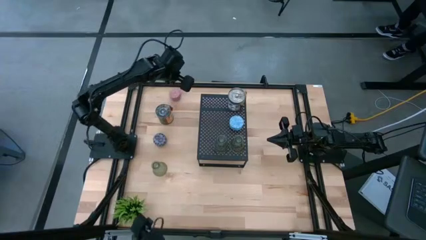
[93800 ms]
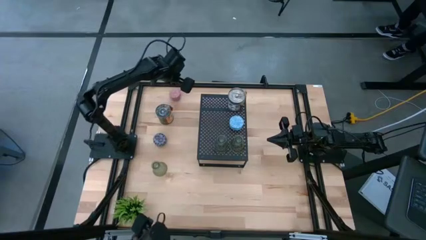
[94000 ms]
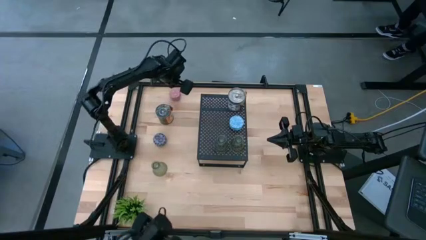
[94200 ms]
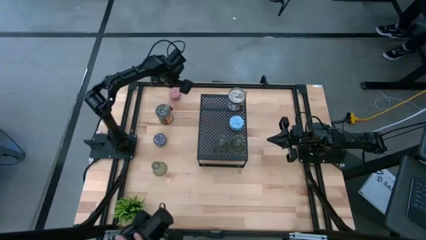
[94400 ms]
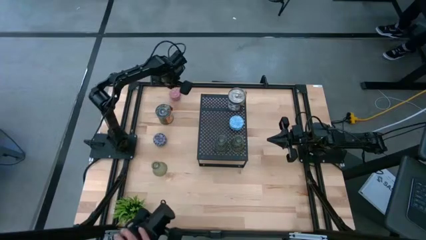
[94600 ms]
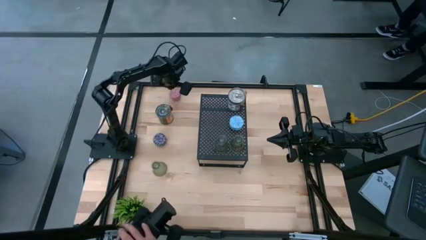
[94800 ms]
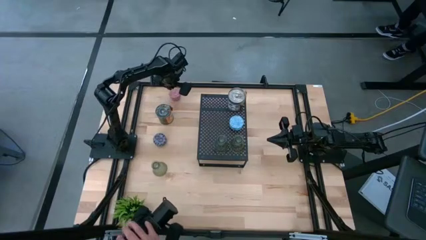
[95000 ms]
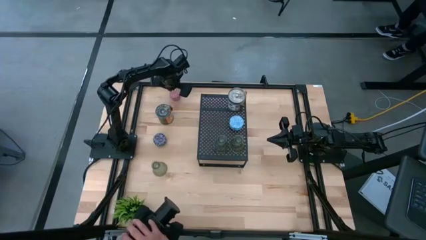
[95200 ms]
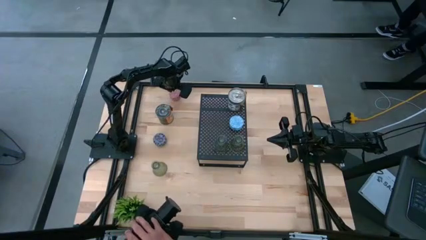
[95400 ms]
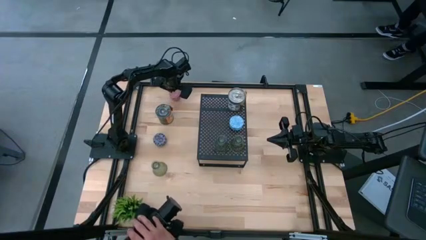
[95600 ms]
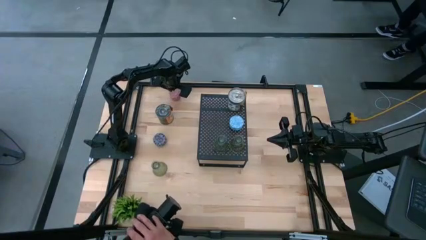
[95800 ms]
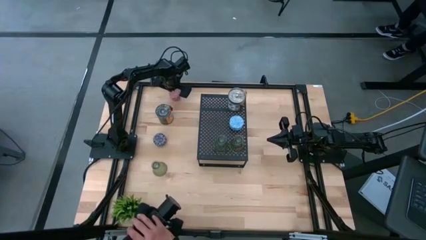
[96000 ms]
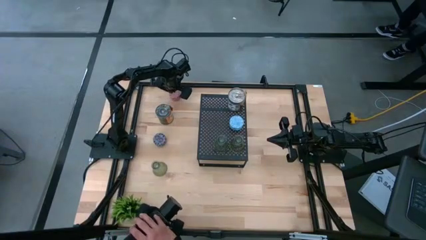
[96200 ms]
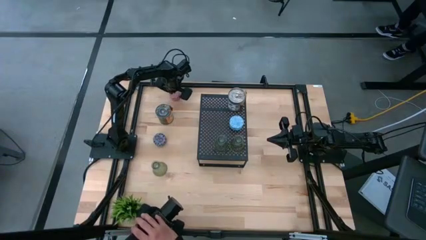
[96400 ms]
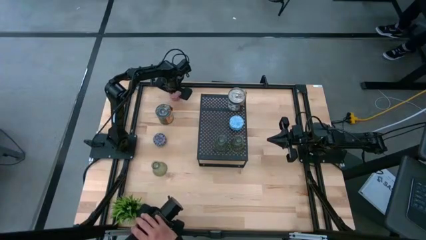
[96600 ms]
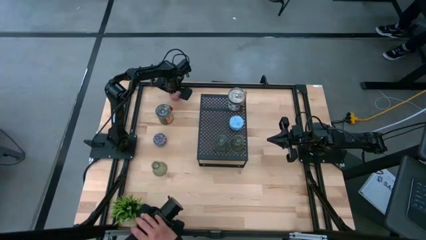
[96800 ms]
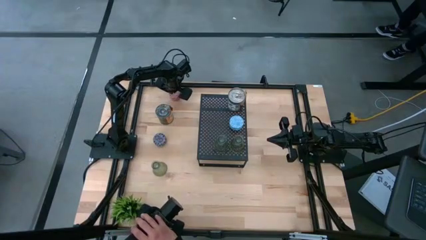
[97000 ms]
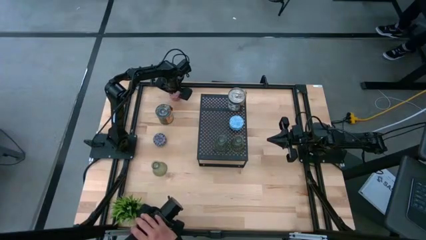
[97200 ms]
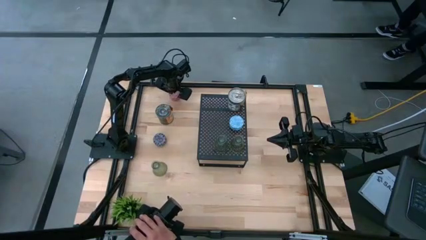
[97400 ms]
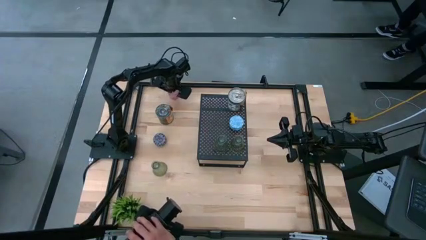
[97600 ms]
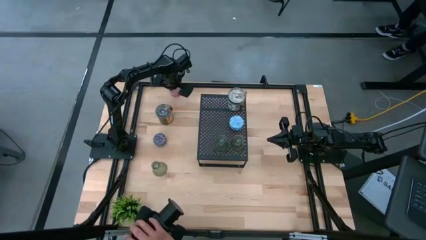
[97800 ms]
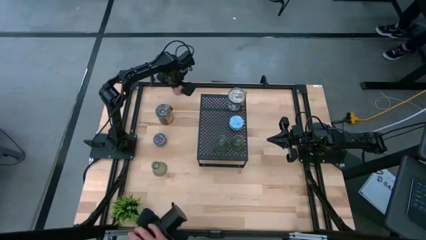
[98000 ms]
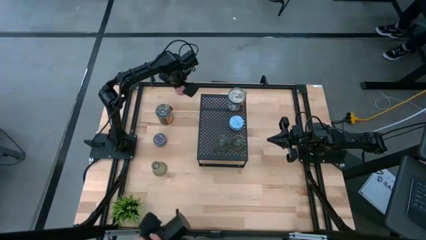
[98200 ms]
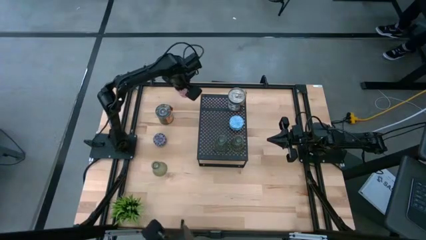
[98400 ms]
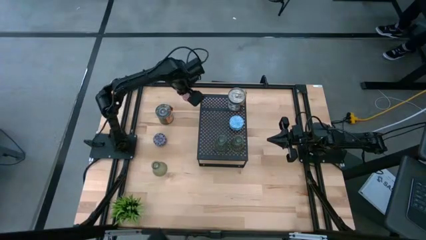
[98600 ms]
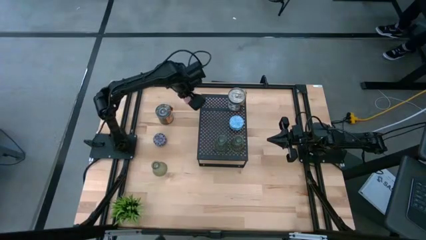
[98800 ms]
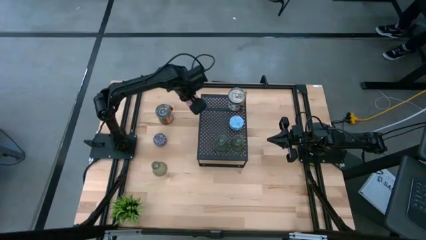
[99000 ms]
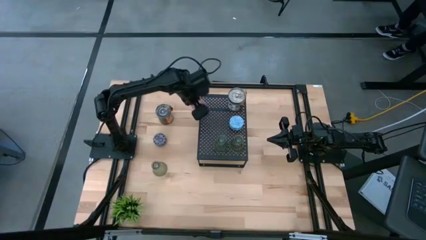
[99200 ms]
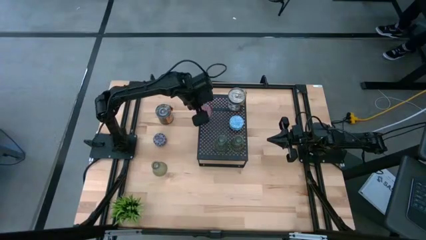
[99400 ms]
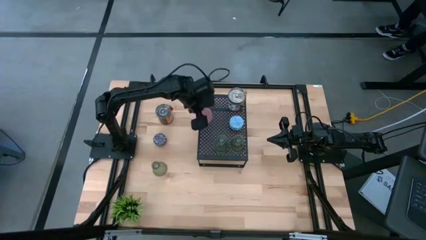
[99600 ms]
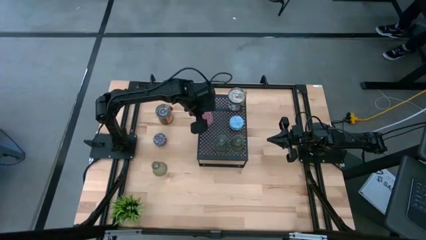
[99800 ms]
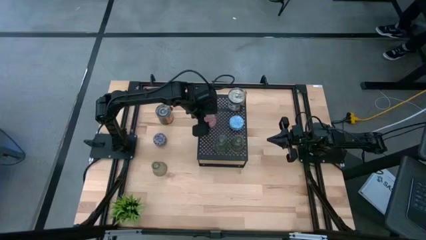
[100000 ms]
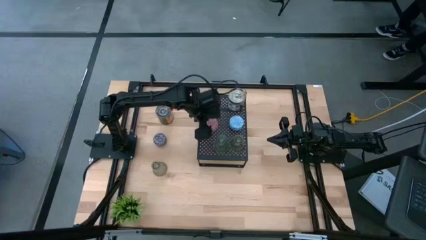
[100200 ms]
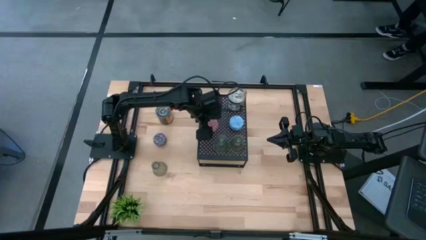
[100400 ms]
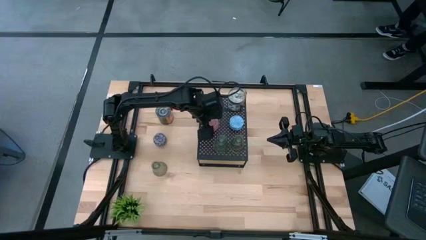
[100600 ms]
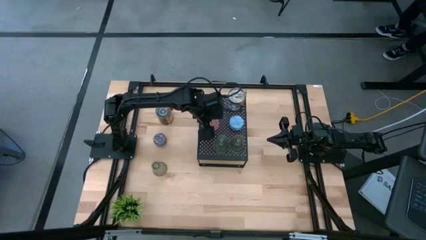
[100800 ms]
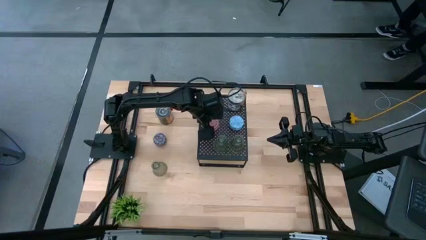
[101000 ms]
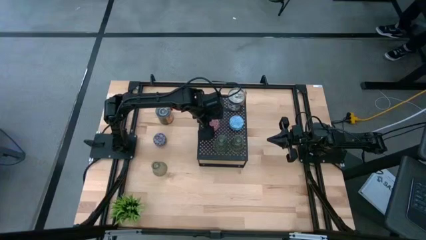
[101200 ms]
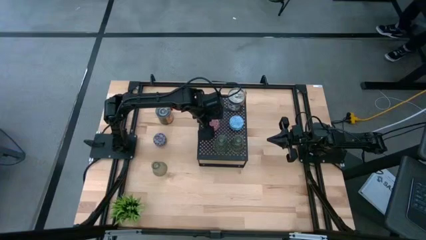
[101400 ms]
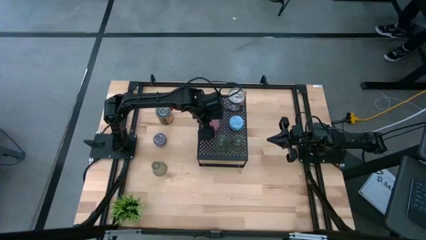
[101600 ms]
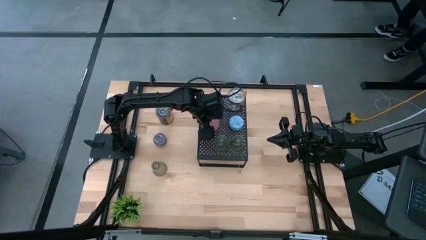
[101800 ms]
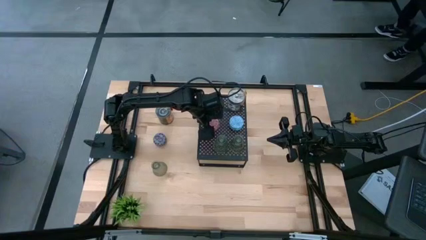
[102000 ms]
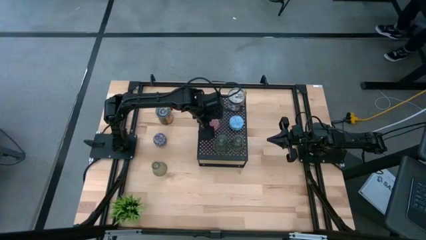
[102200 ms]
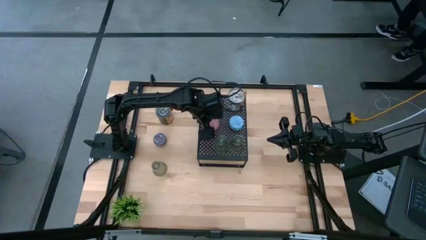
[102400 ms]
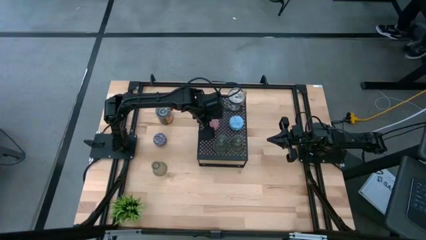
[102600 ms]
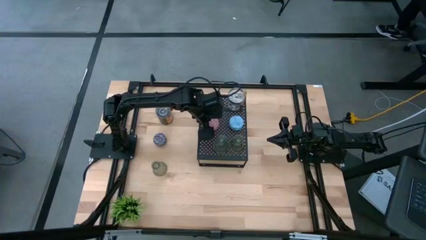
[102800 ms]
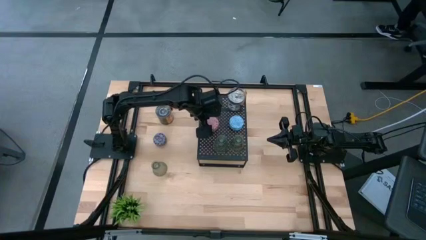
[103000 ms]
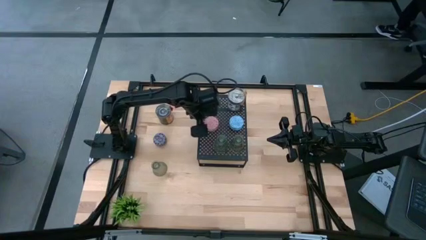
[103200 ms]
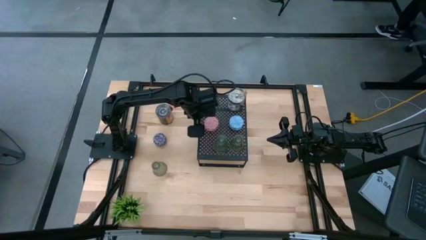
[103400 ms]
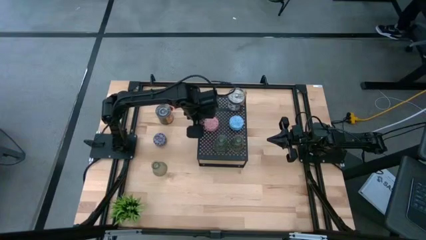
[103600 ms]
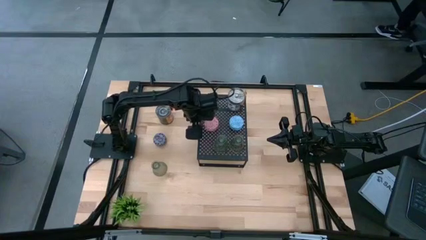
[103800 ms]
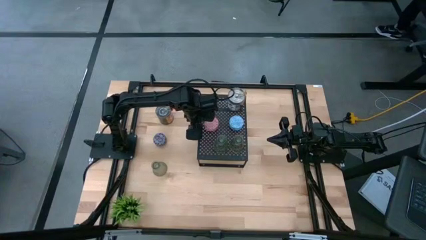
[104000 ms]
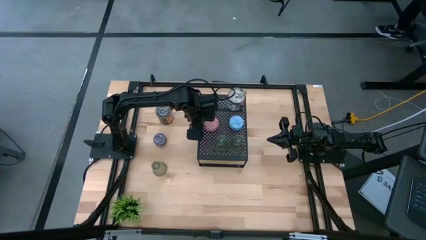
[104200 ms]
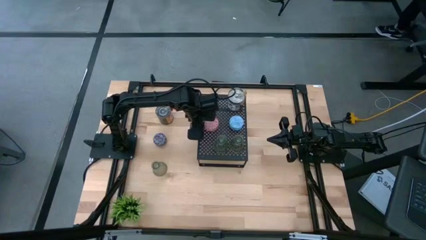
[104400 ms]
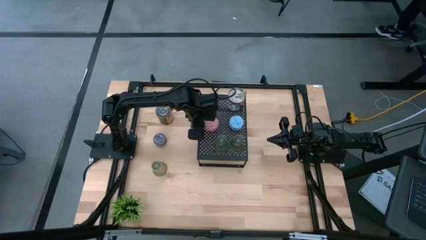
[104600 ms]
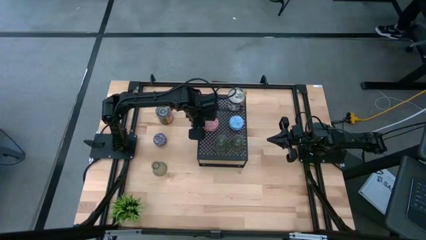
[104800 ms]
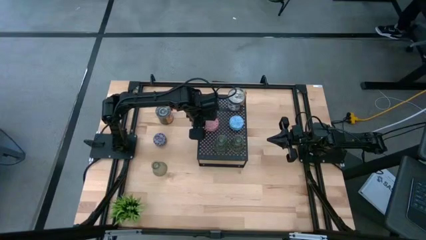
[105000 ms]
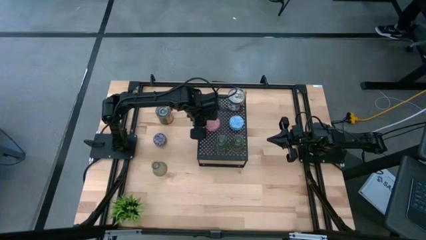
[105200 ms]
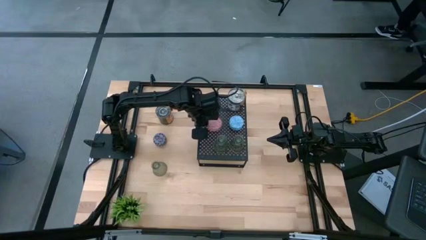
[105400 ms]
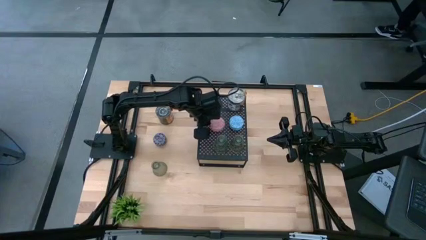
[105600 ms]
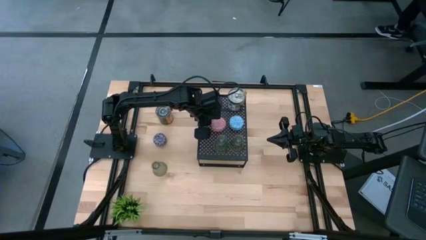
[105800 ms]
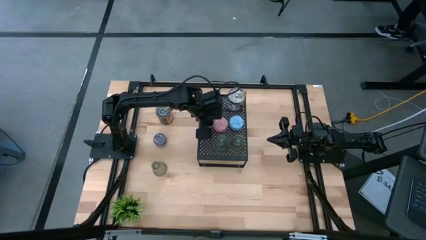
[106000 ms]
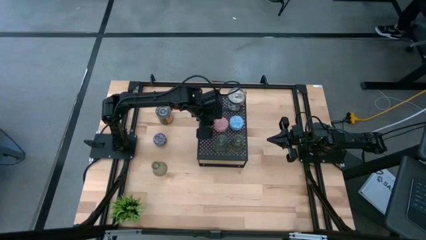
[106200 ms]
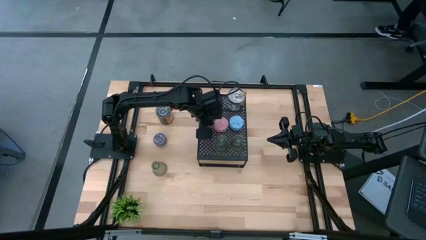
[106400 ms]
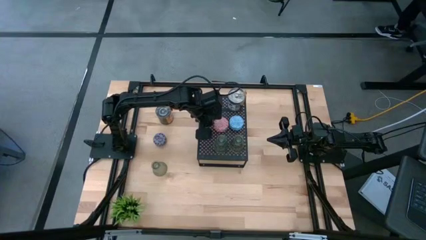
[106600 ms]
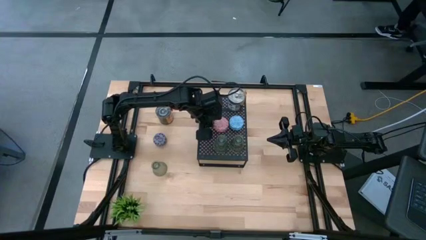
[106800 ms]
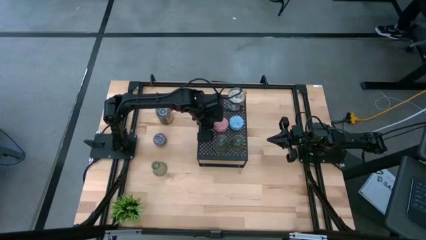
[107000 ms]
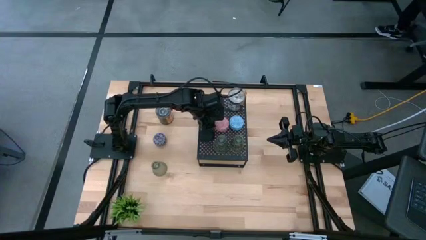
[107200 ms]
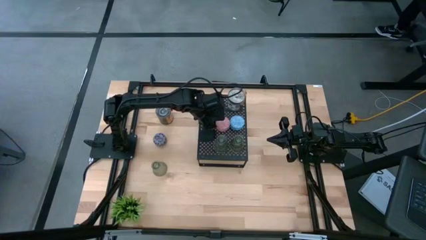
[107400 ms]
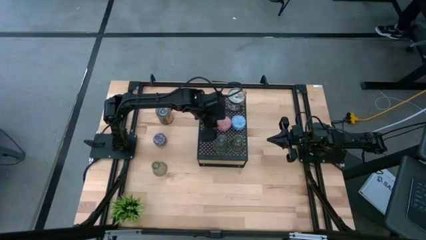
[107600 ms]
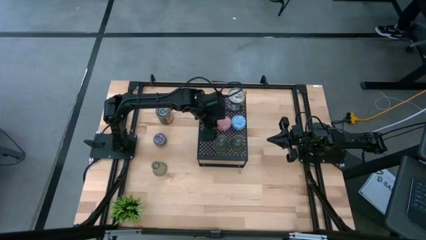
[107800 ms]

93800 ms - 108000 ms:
Task: Pick & Place candle stick holders
Put the patterned pink scented candle on the shelf aligned with the other patterned blue scented candle
